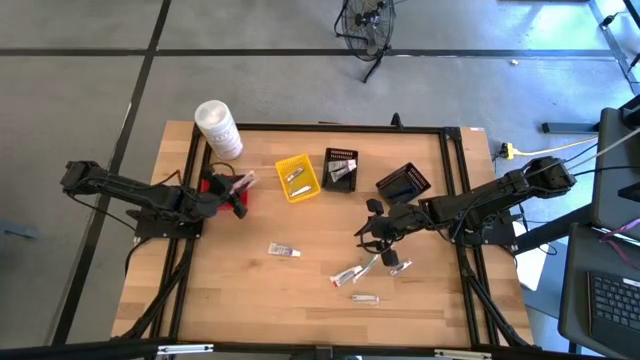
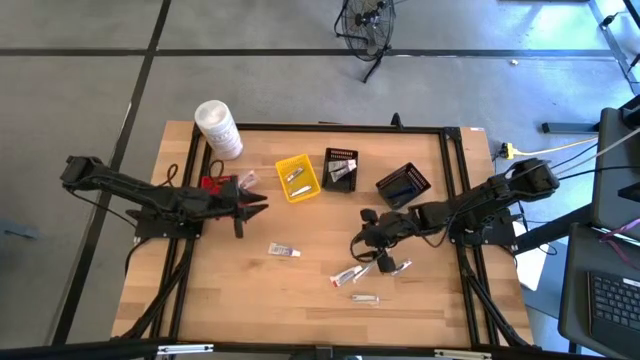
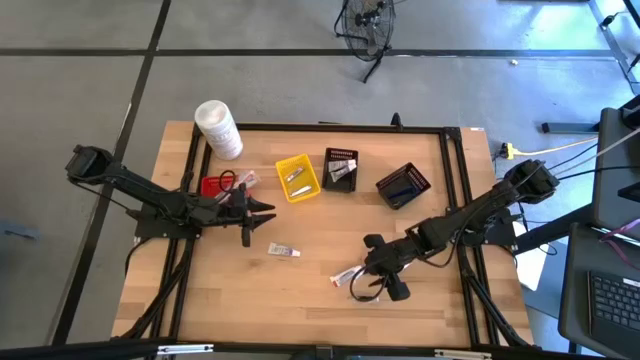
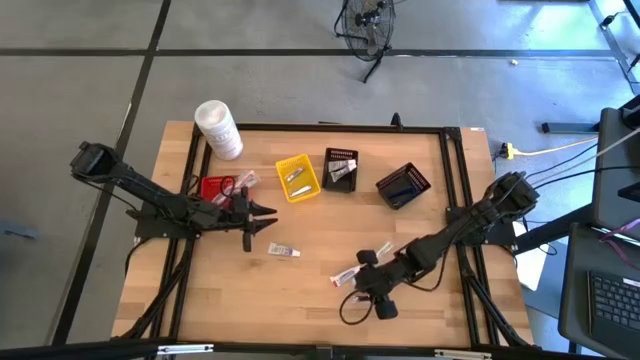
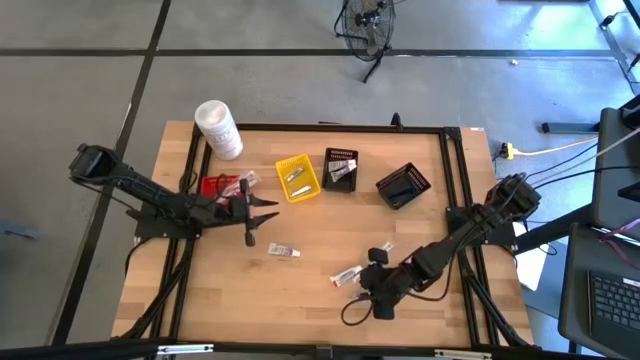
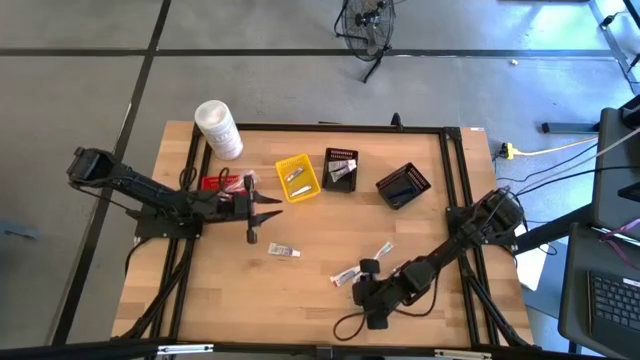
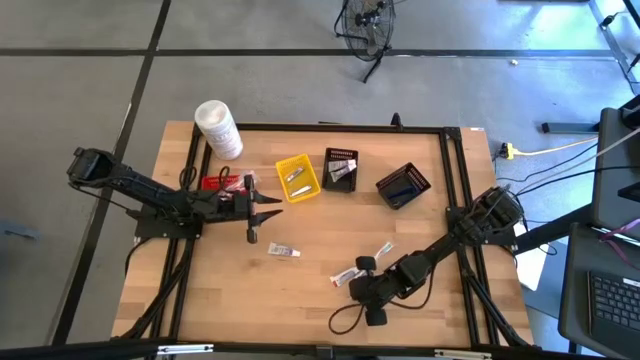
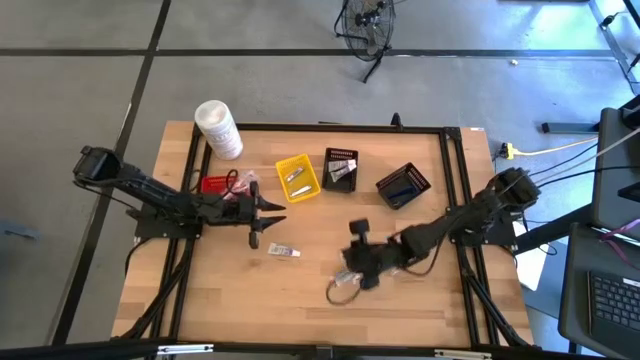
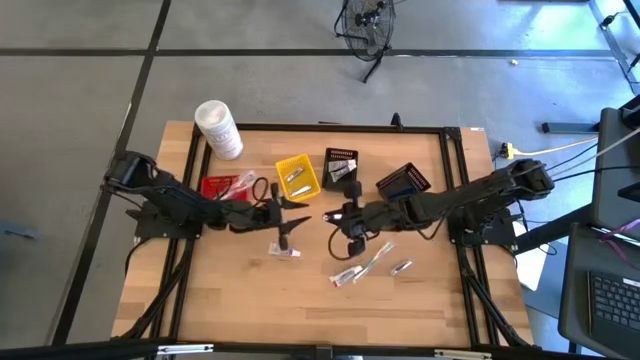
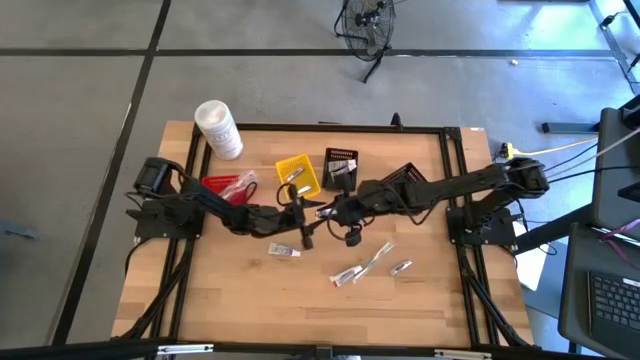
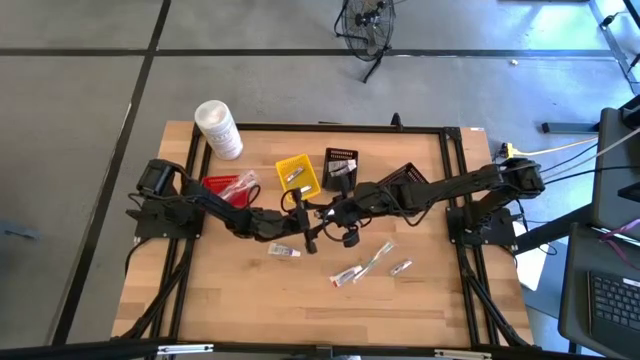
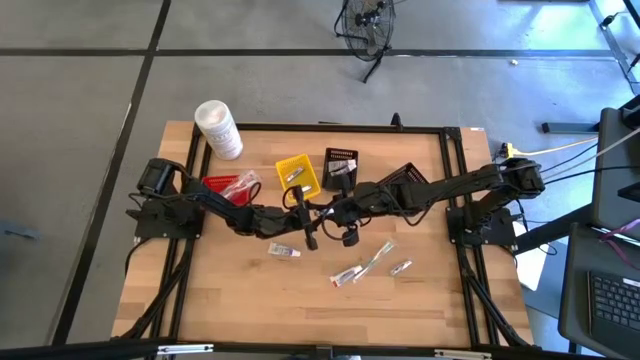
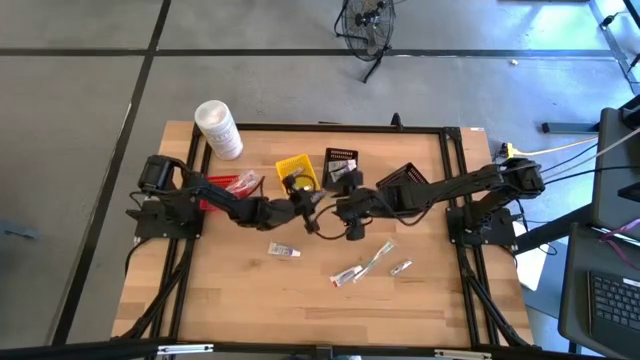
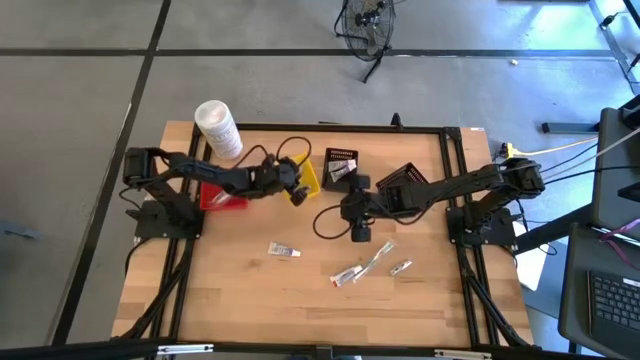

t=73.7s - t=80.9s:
Task: Pick & Place Travel size toiletries
Put the nail cutter into the yellow bin

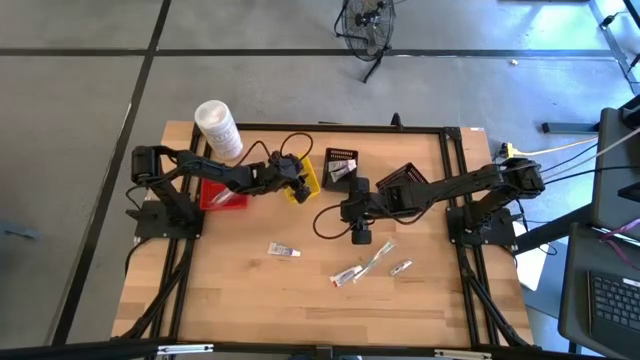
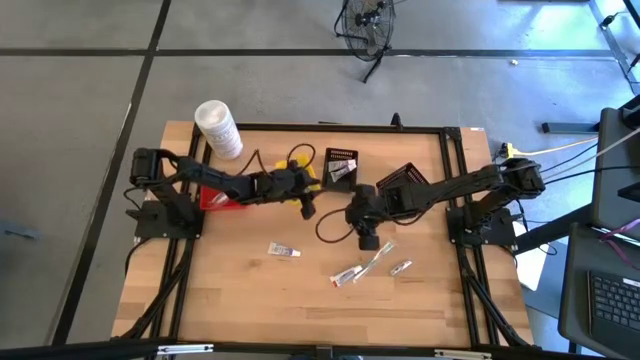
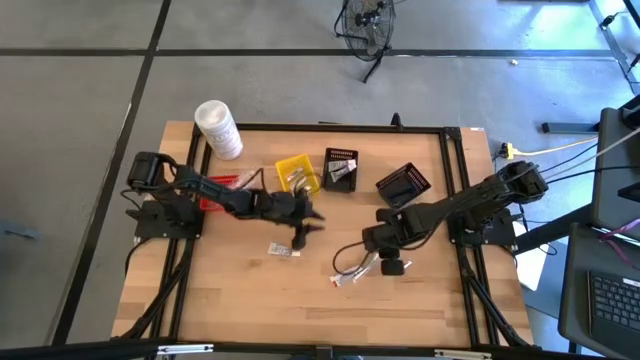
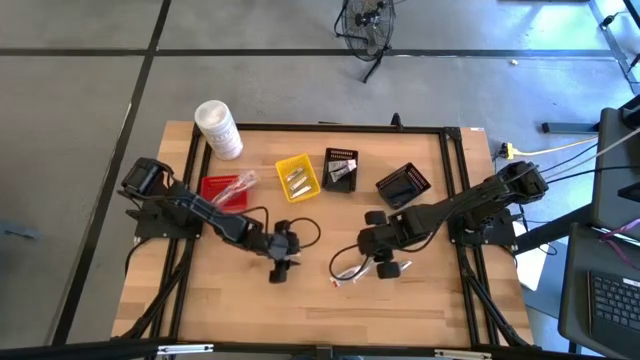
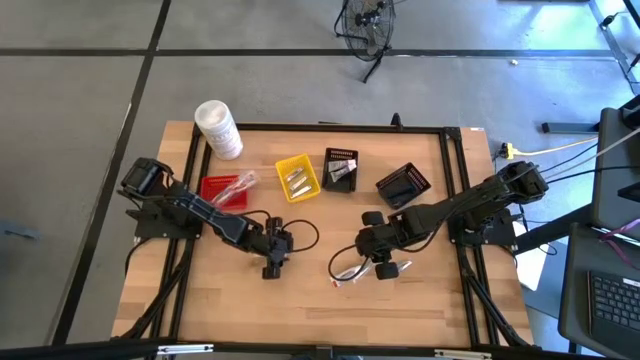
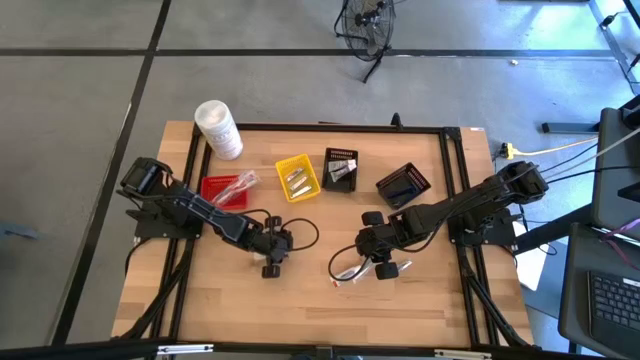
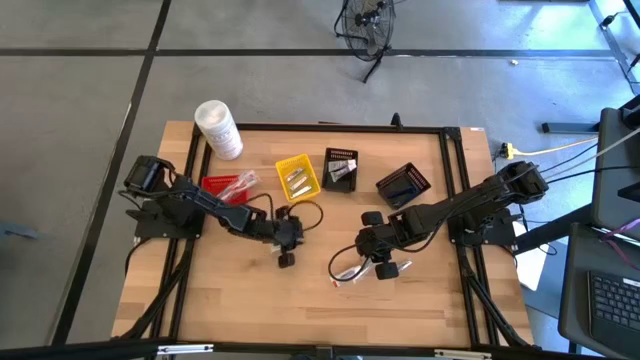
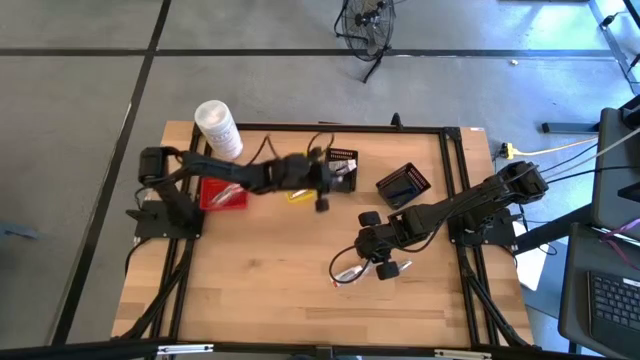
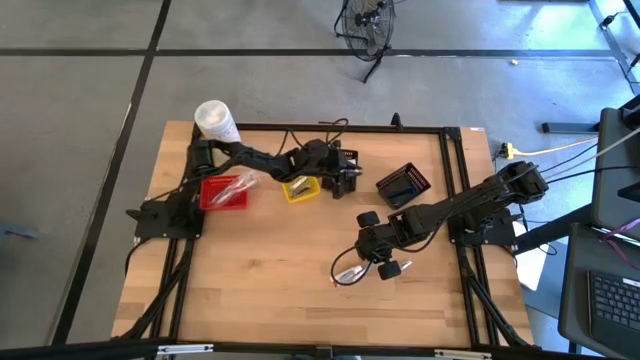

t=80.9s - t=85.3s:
Put the toothpaste into the left black bin

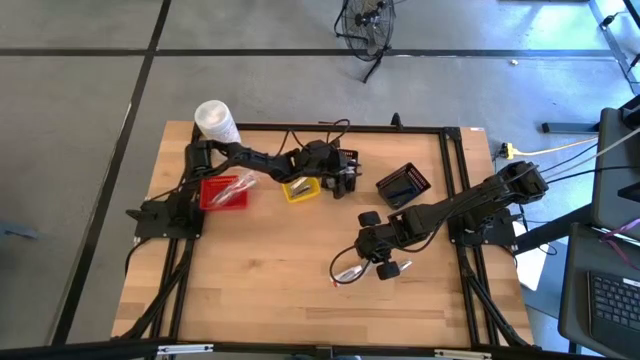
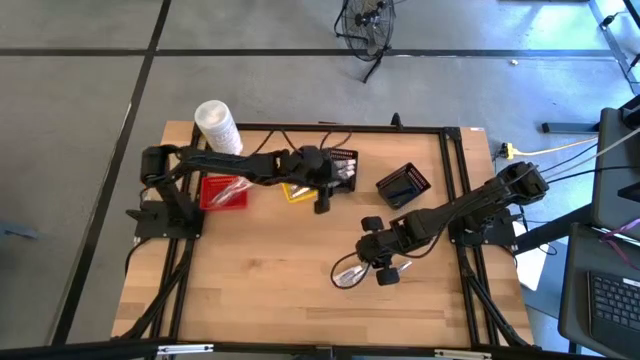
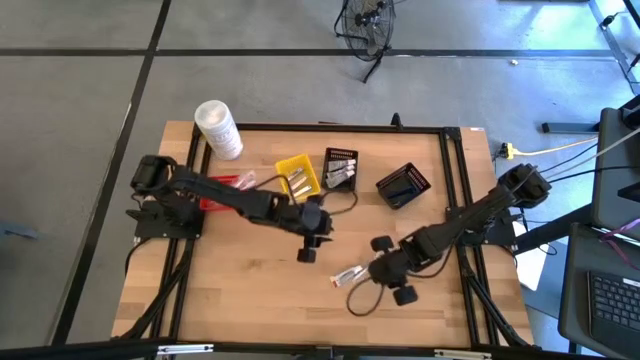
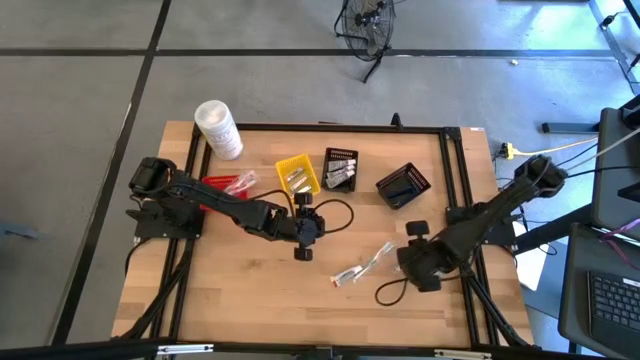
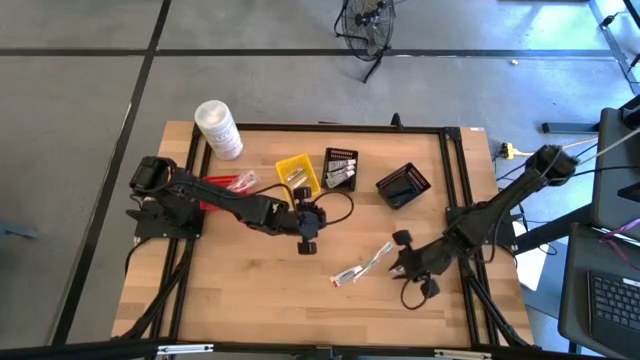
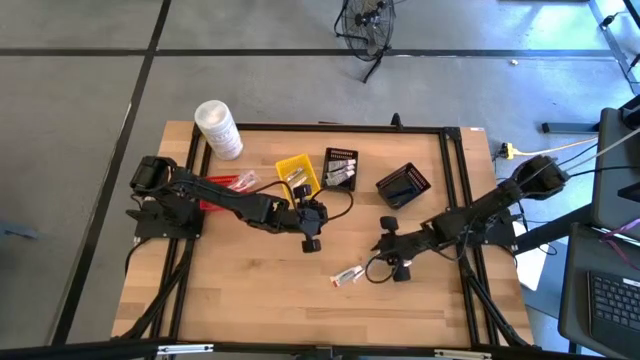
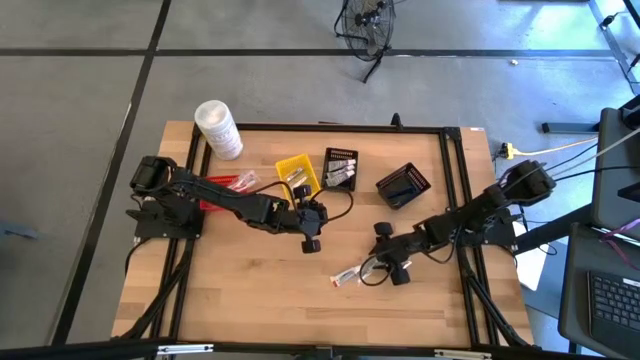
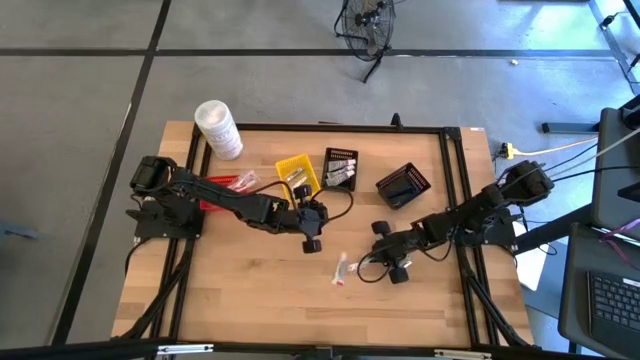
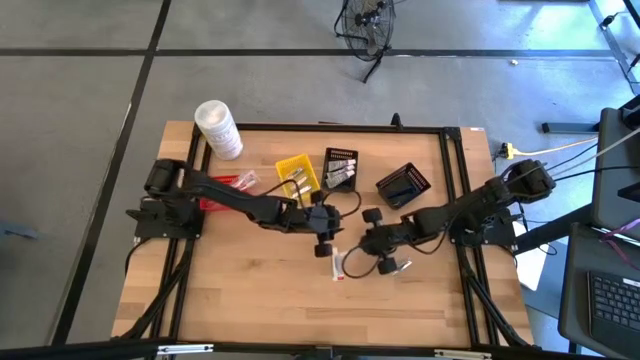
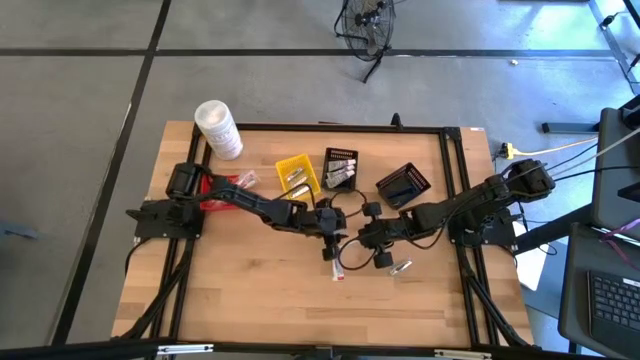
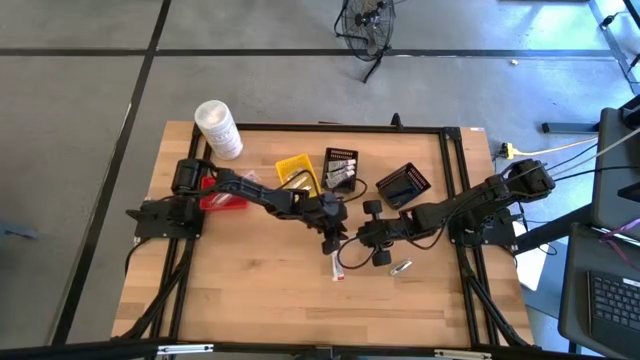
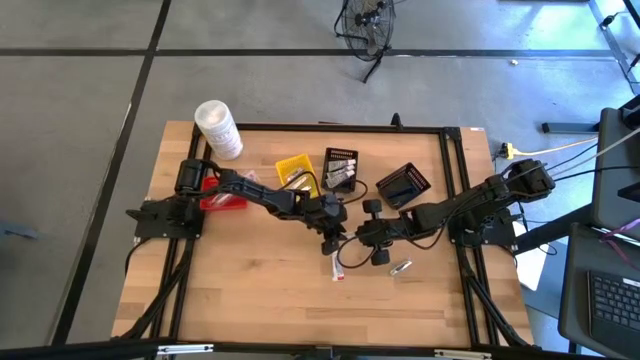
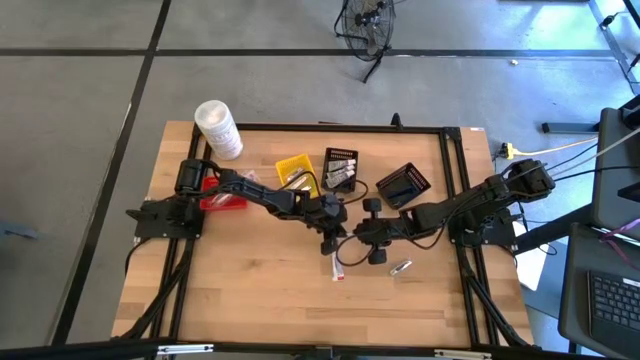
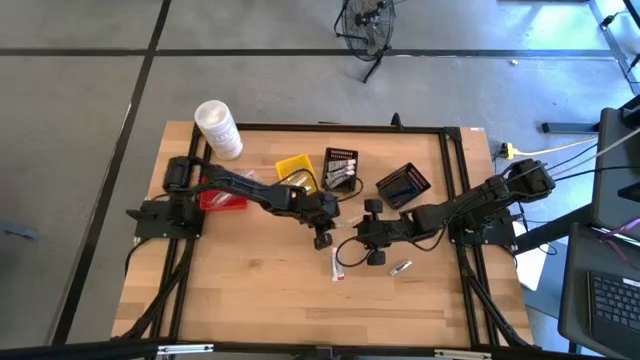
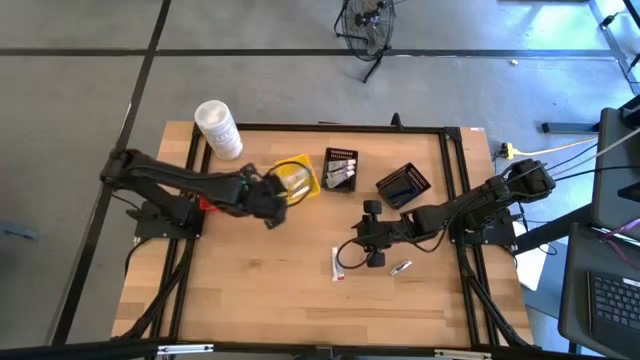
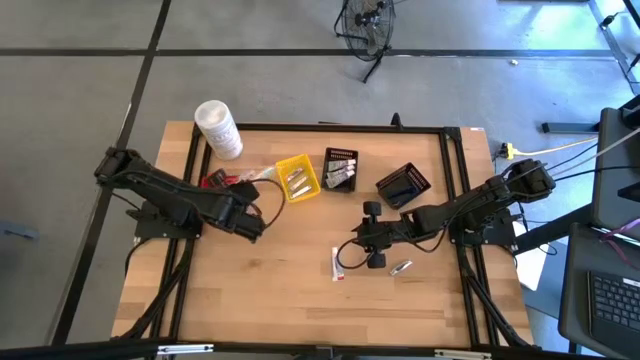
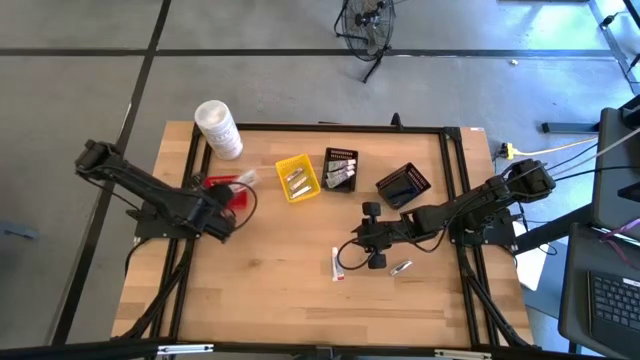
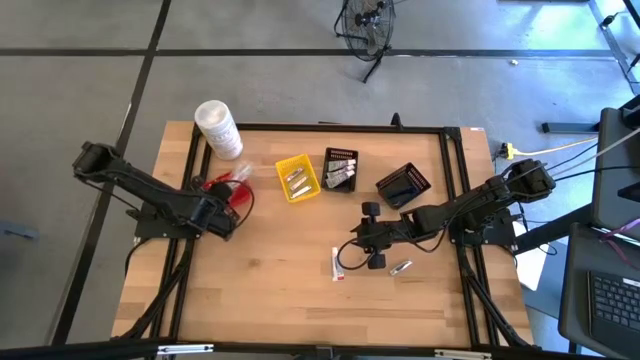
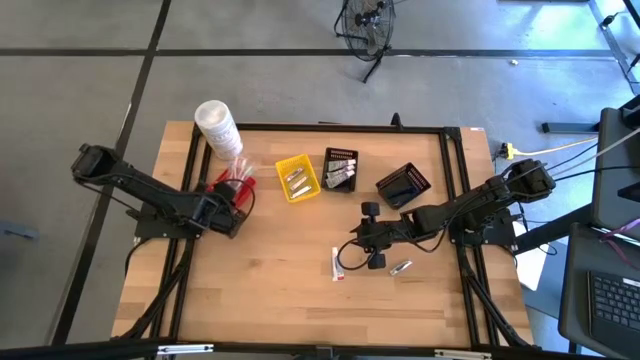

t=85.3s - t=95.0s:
Put the green toothbrush into the red bin
